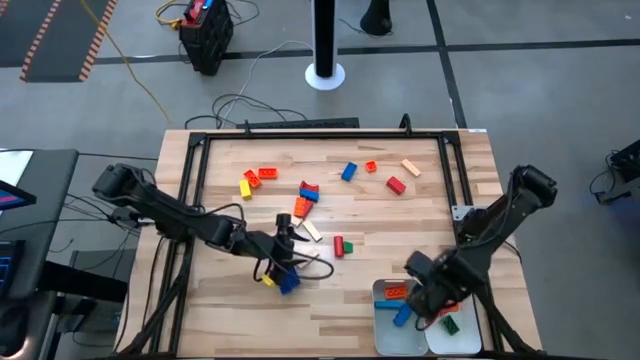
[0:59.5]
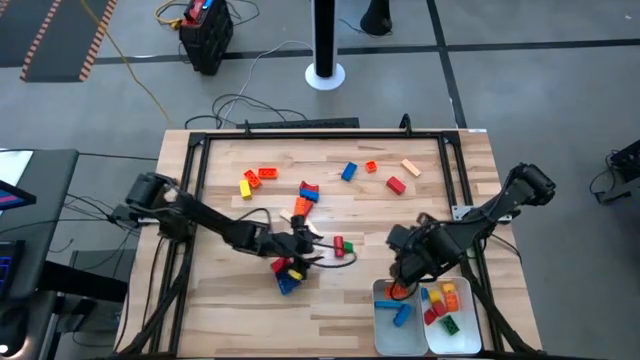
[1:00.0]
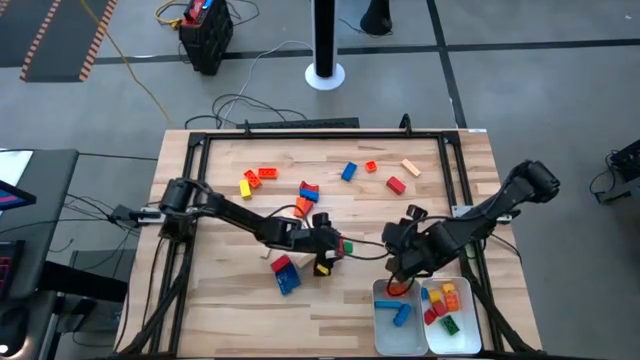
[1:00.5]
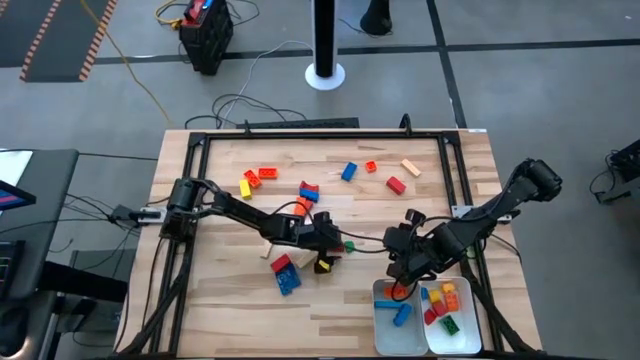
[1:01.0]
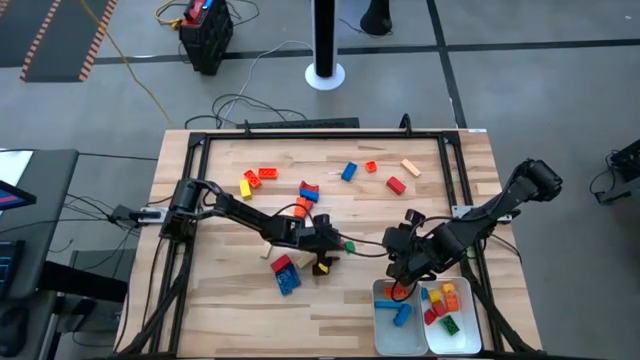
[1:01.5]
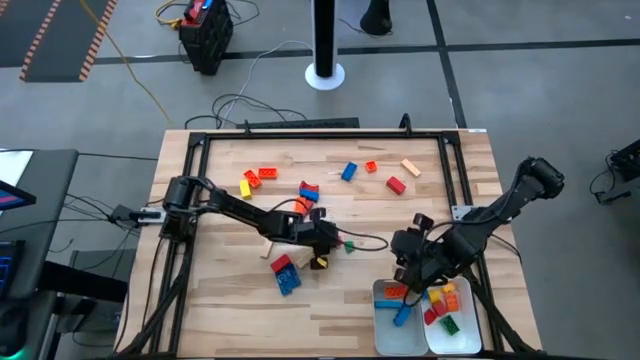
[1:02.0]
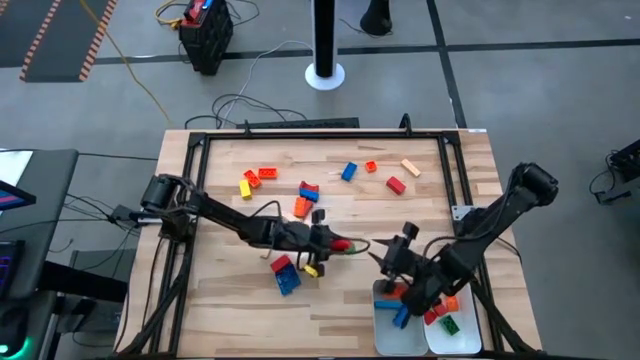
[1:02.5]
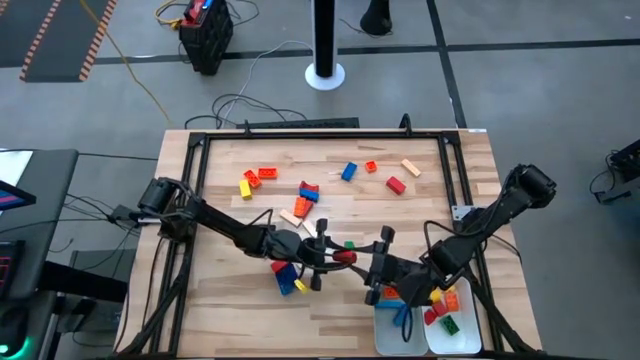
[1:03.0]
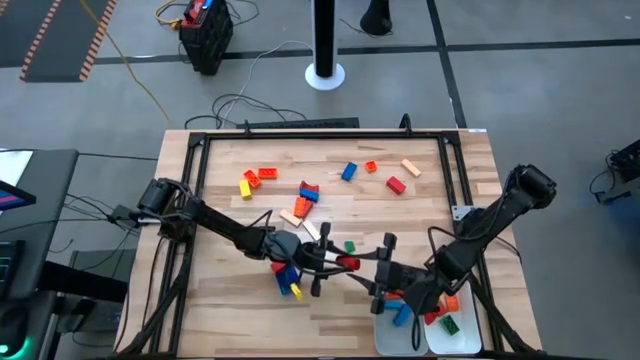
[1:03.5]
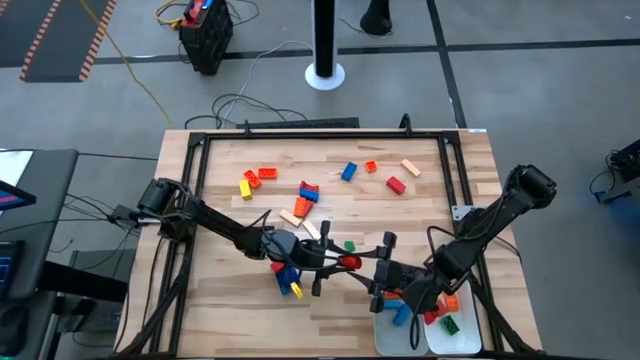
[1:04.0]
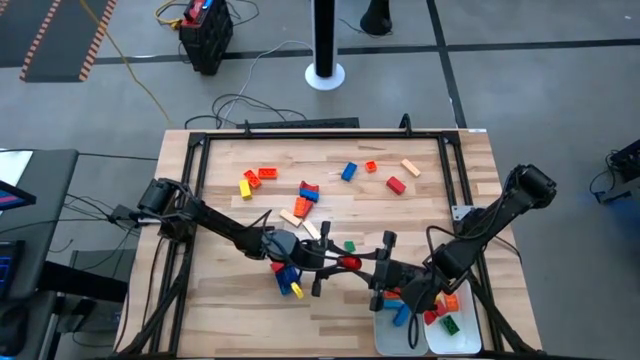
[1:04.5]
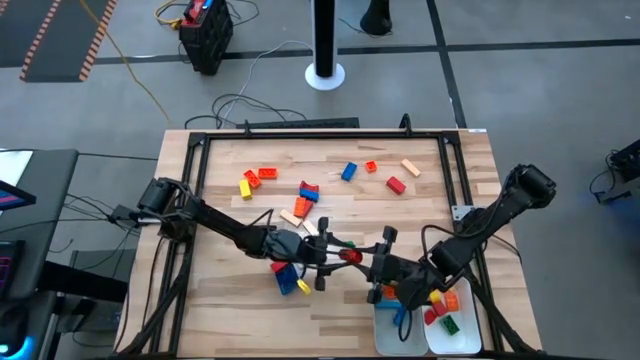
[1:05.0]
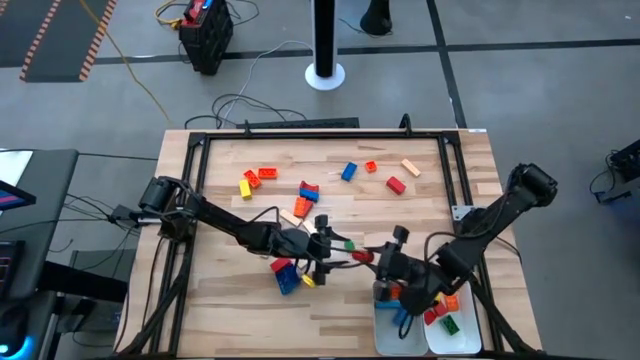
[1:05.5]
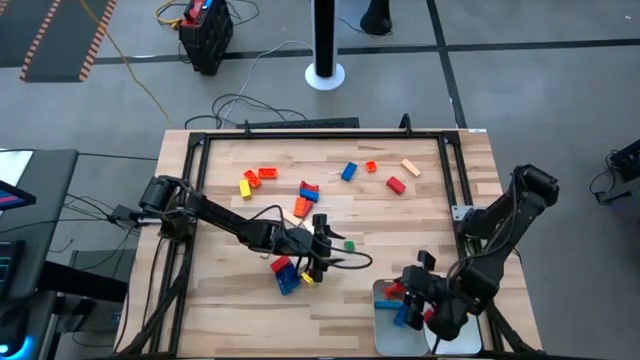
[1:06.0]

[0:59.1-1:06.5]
Task: Sort blocks by size
Put the large red wooden block into the gray bin

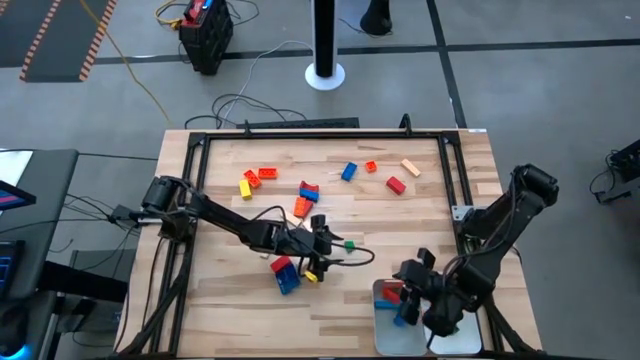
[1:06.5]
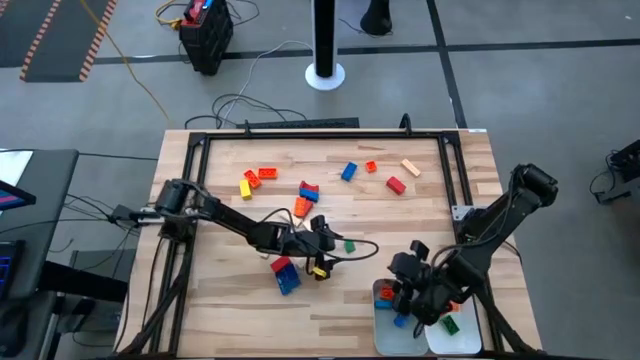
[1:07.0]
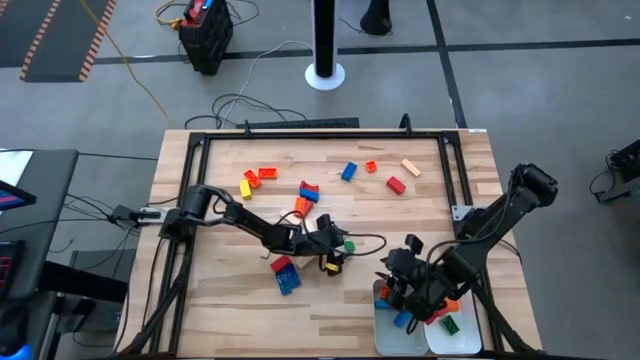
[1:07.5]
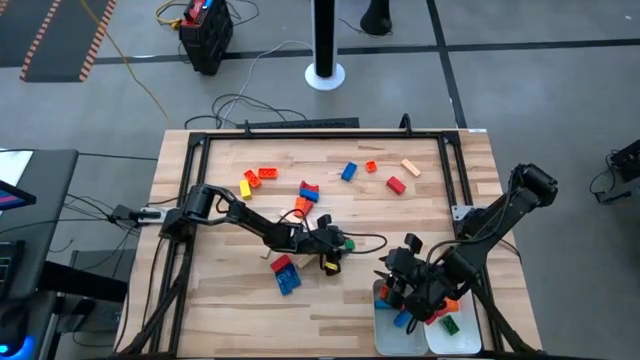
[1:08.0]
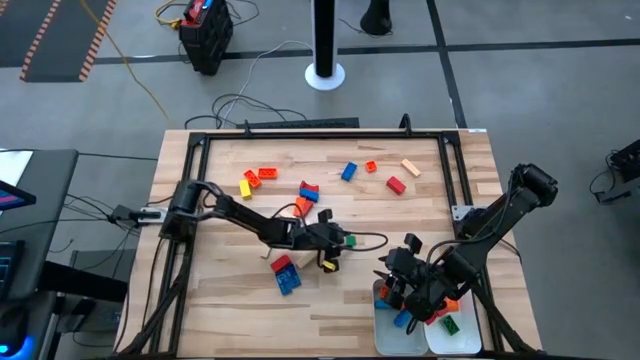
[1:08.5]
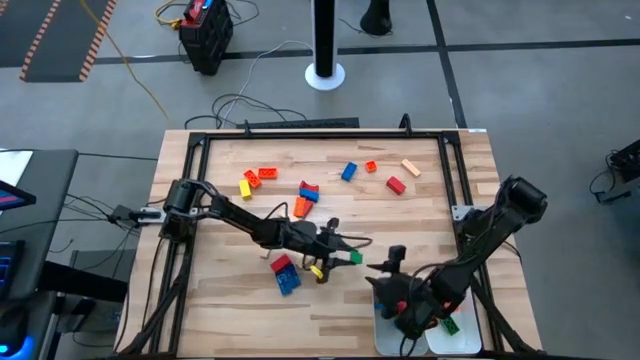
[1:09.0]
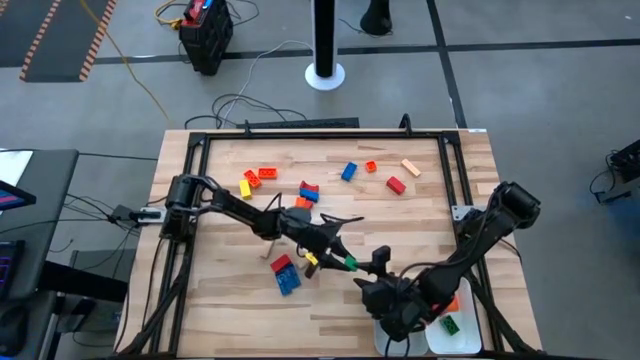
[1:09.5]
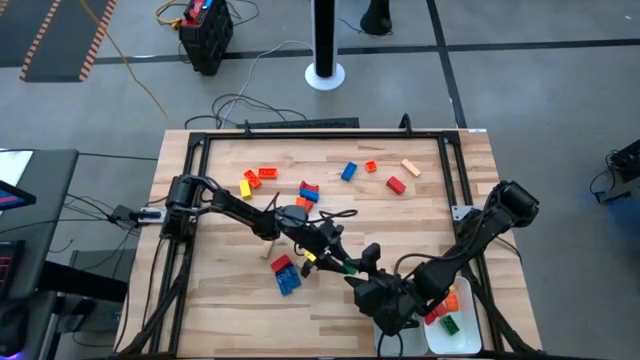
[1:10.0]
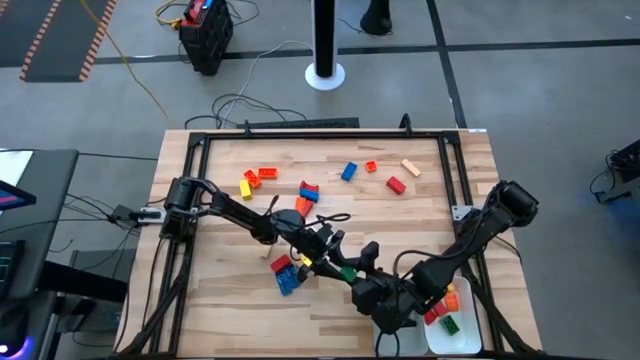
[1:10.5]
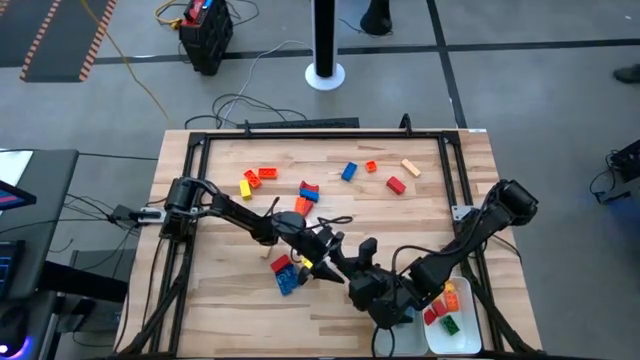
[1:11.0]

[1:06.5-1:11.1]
Put the small green wooden block into the white bin

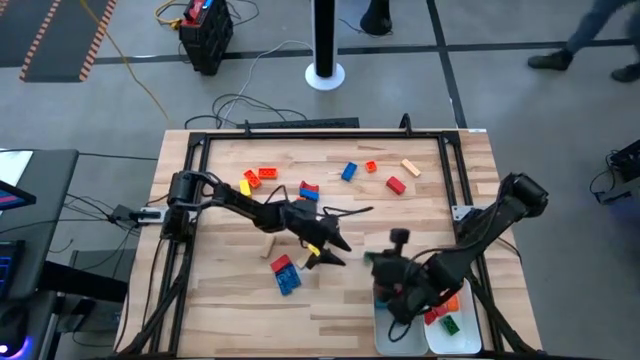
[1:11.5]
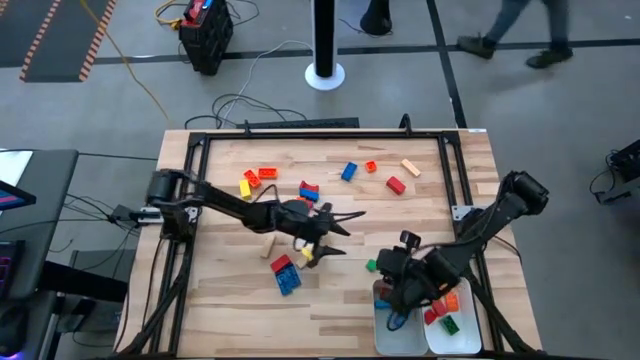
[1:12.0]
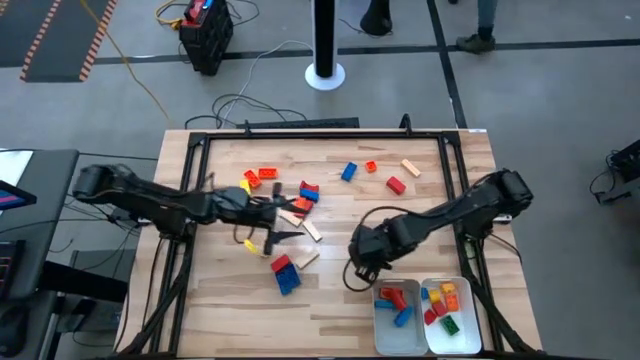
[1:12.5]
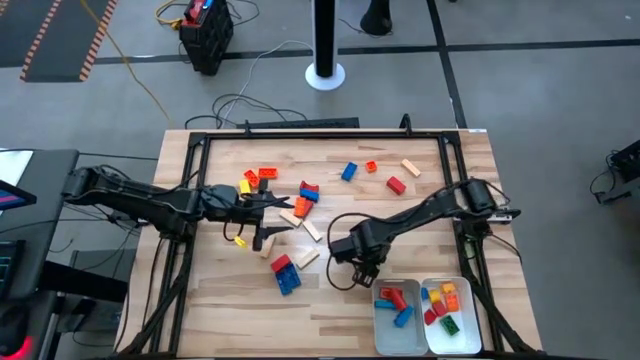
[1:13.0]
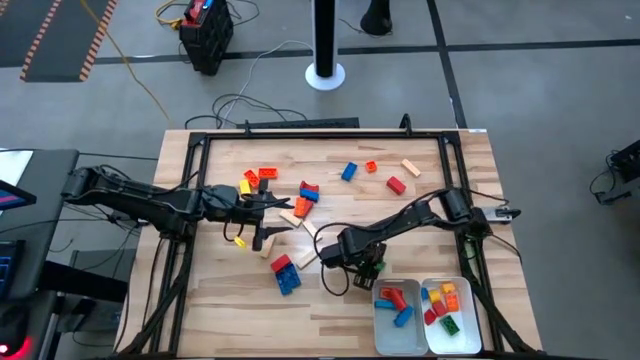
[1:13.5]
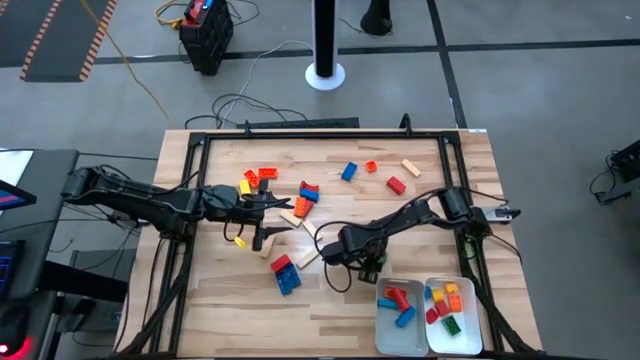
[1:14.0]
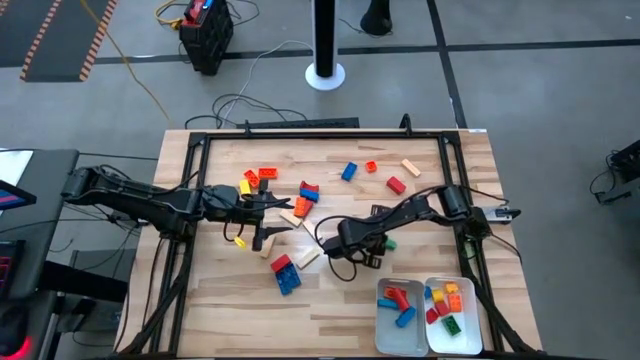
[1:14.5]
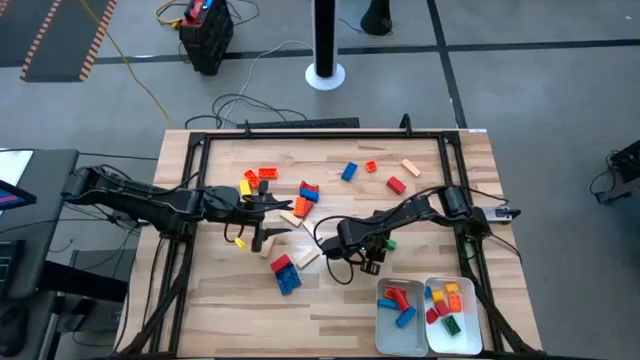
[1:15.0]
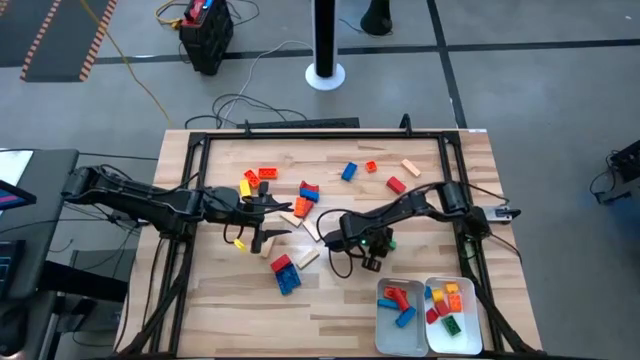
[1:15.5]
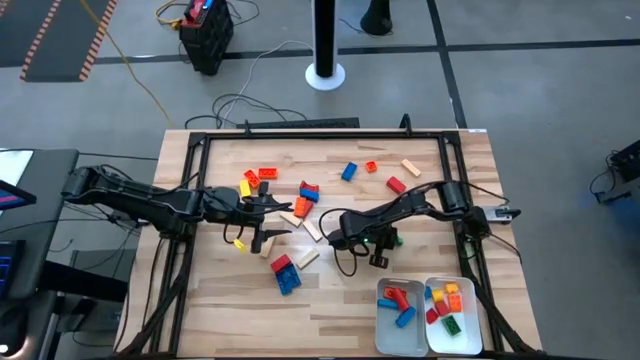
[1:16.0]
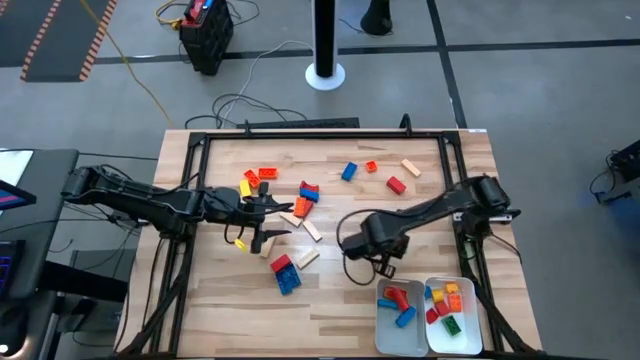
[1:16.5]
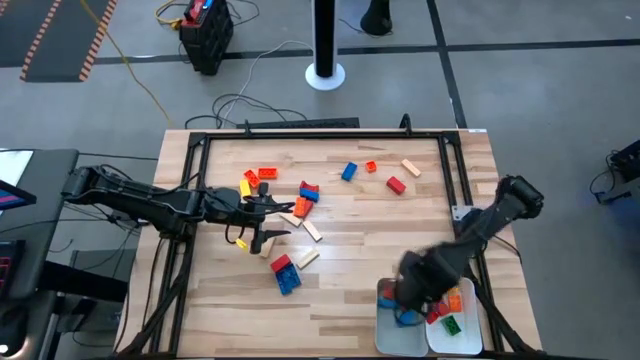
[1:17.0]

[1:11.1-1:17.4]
Put the small green wooden block into the white bin

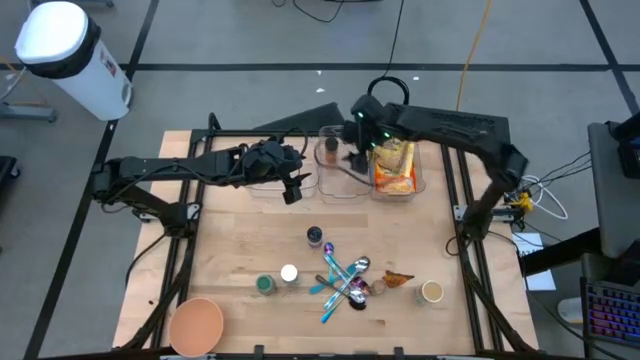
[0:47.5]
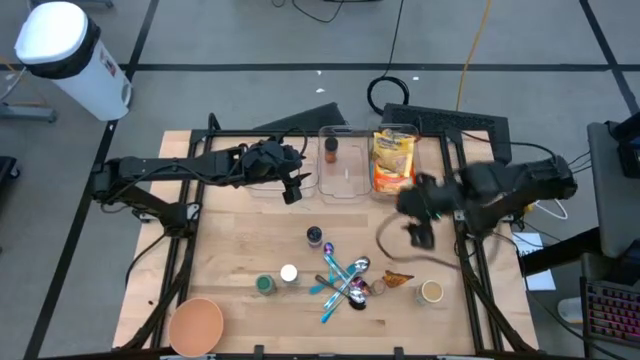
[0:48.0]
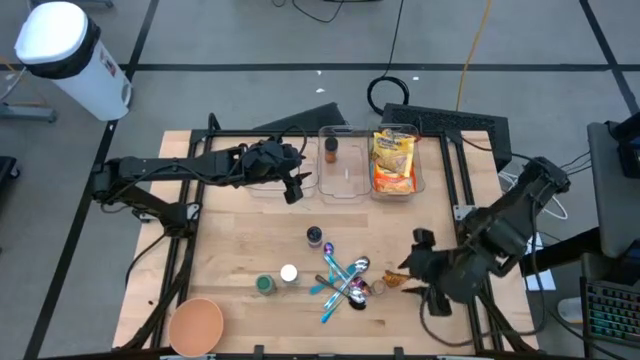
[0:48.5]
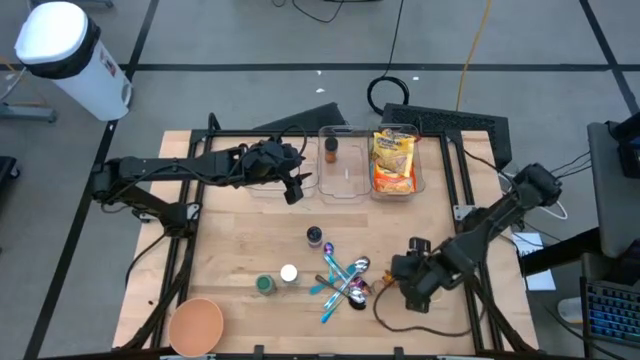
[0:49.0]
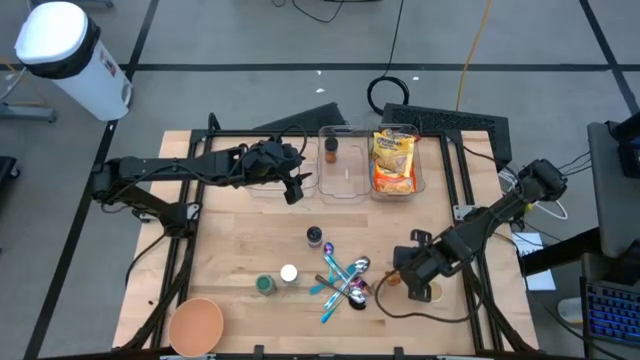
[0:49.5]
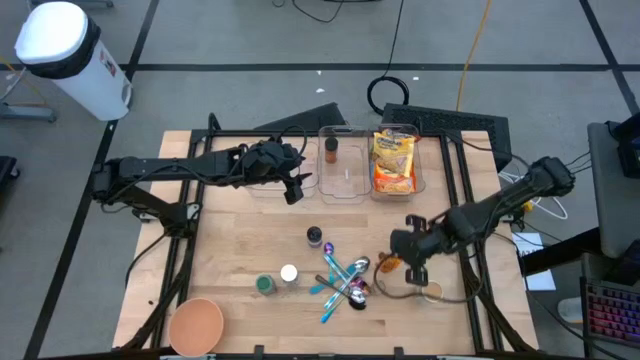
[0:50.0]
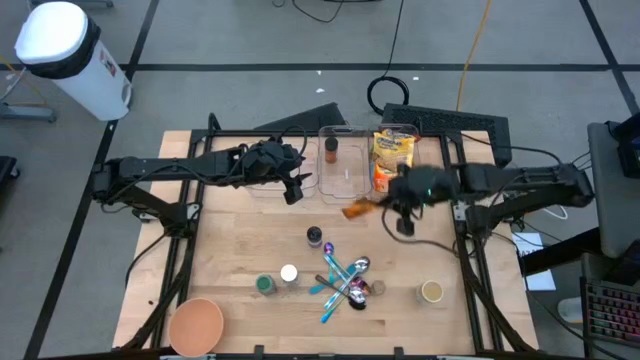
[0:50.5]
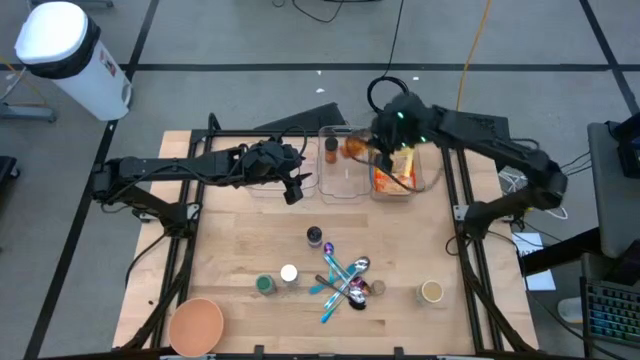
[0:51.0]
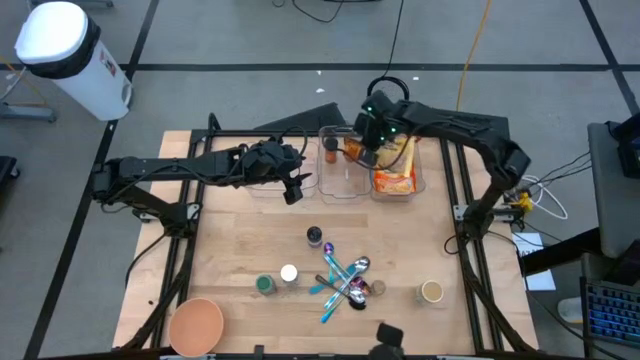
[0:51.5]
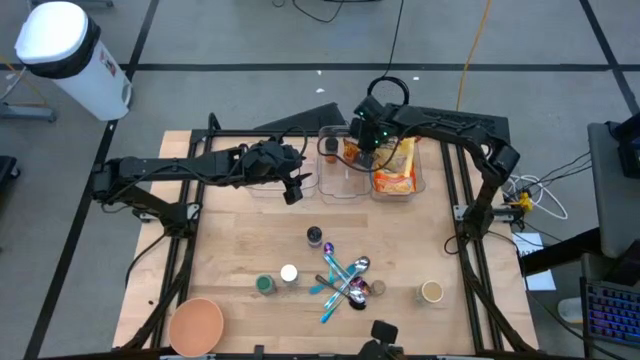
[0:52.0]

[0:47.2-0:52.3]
Task: Pick & Place Food Item
Put the orange seasoning pack into the middle transparent bin
